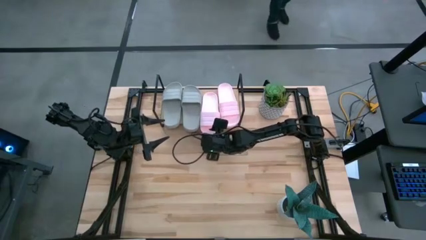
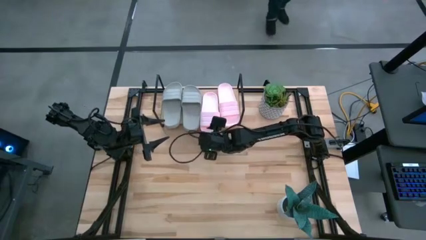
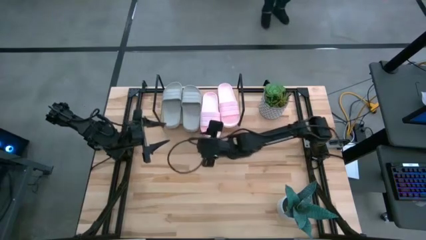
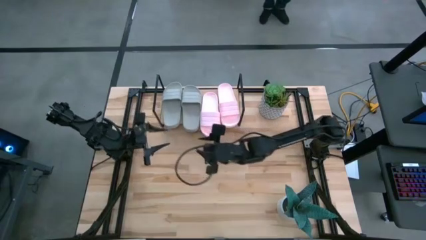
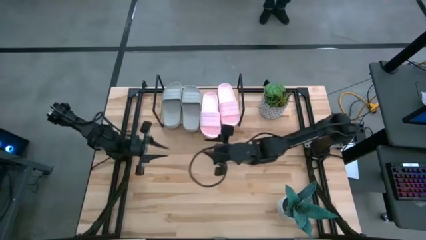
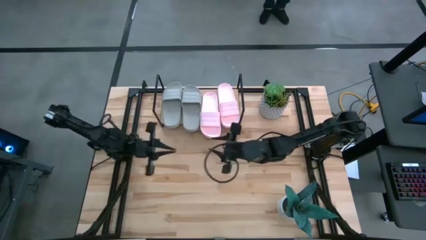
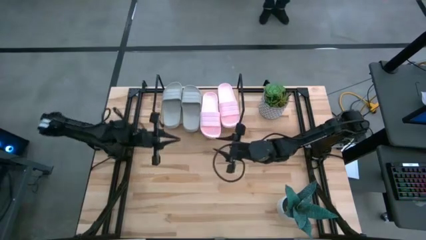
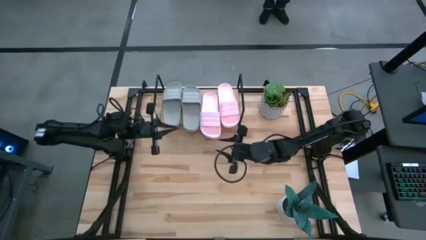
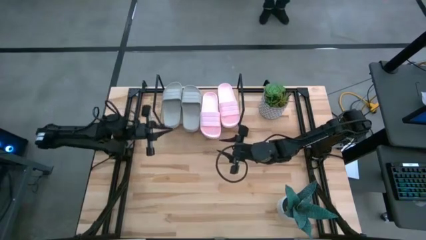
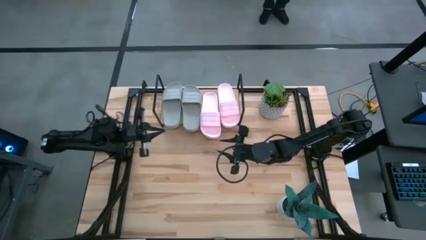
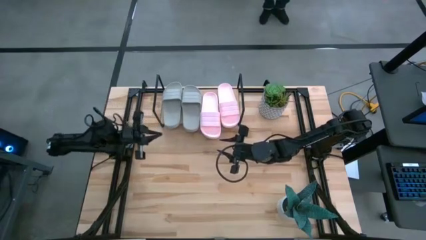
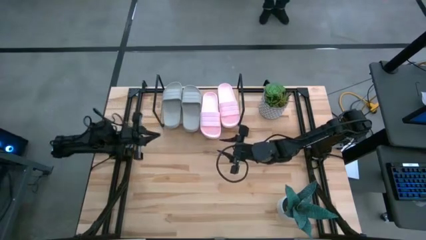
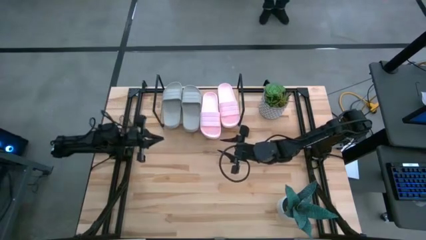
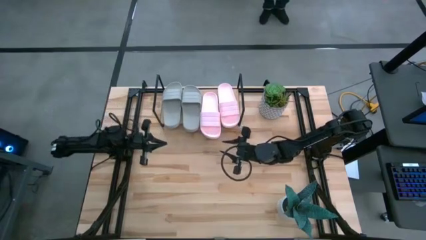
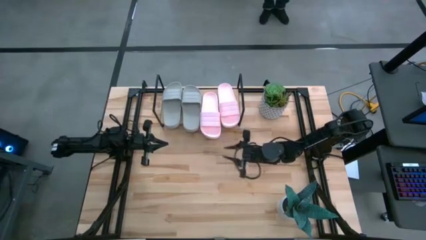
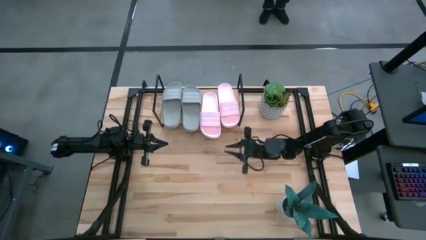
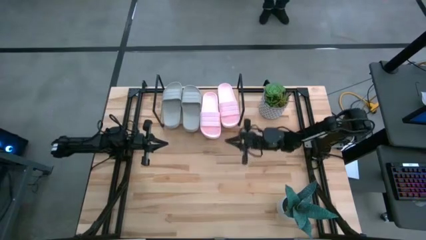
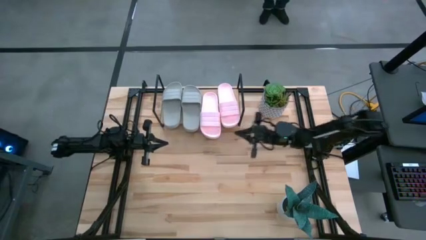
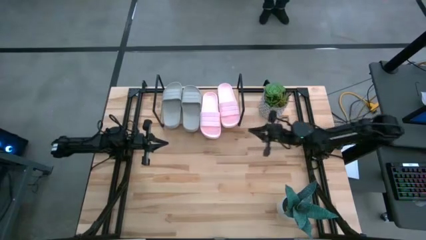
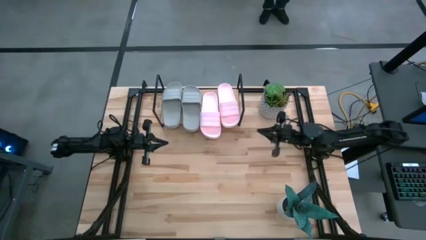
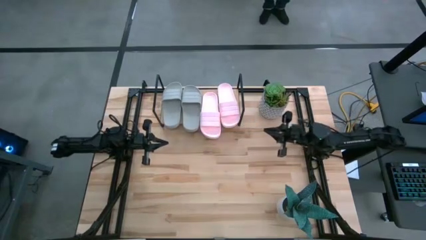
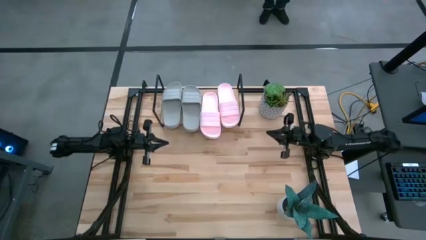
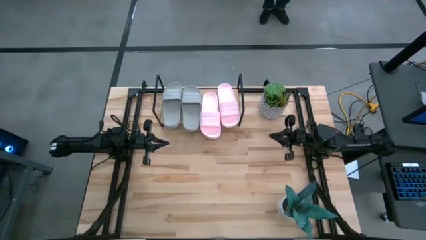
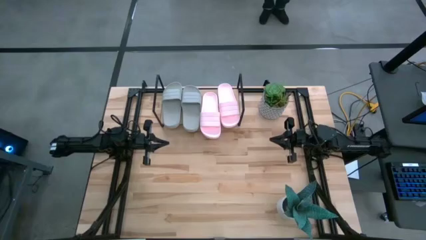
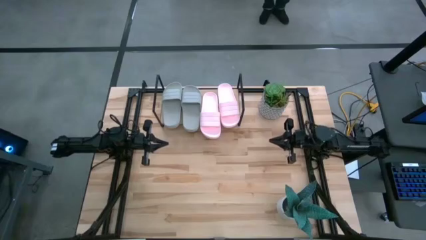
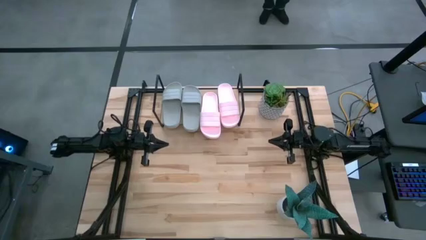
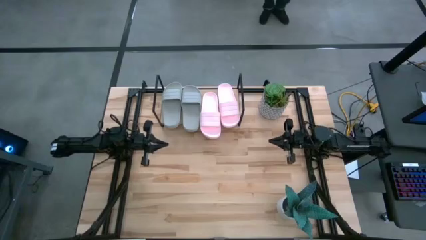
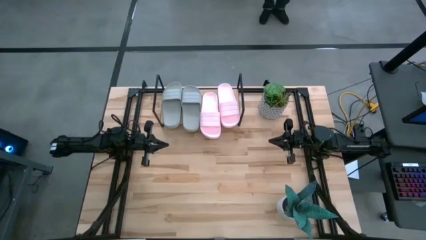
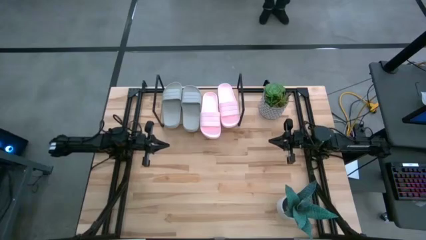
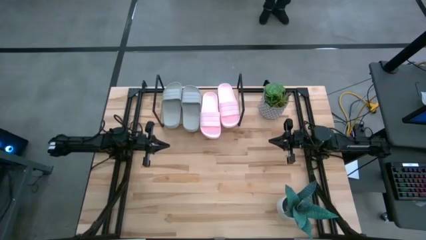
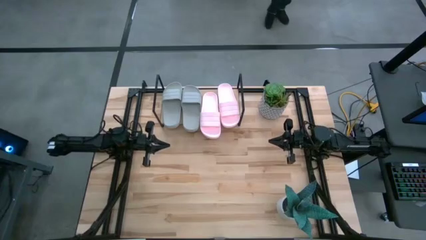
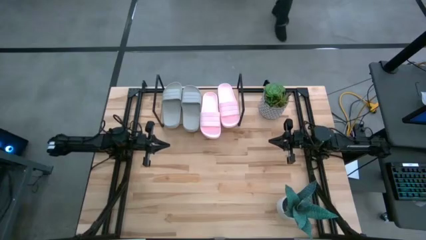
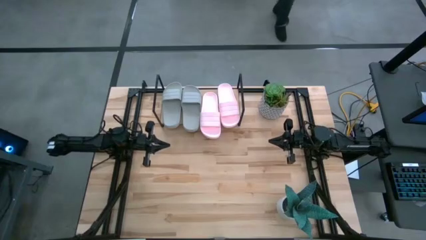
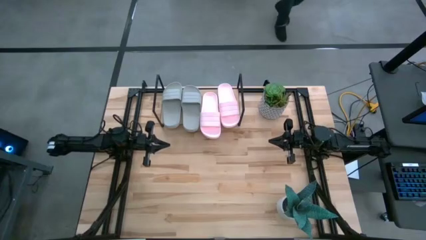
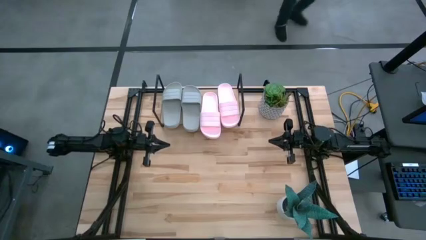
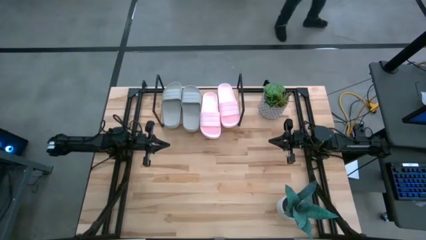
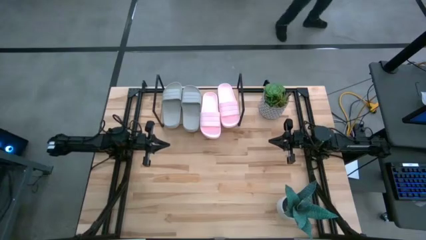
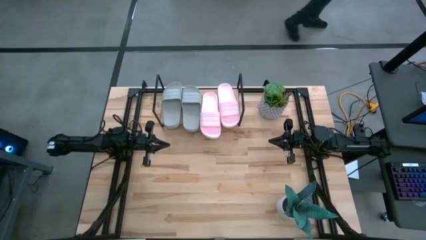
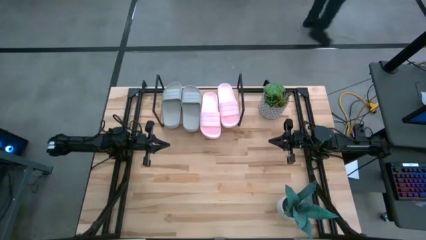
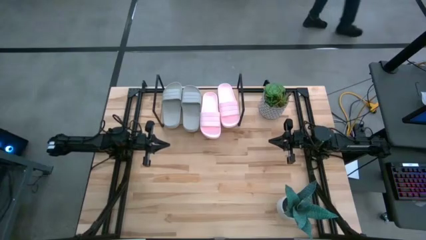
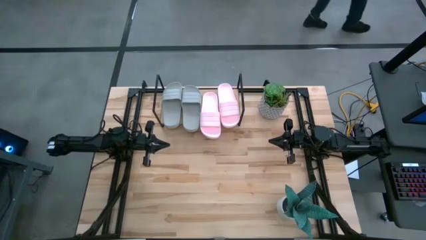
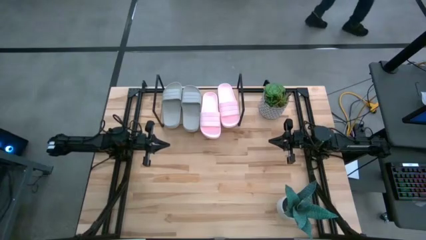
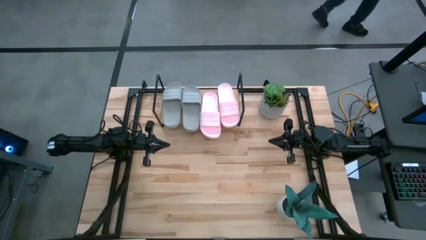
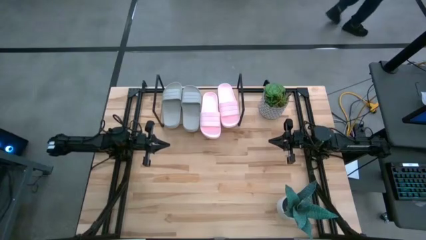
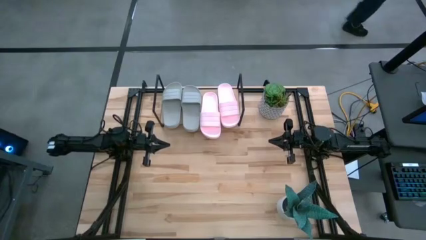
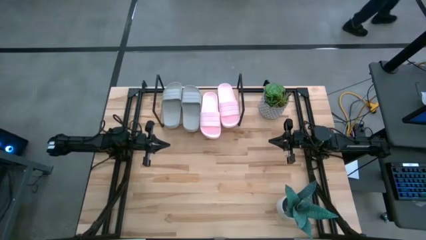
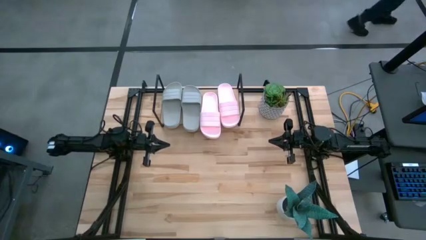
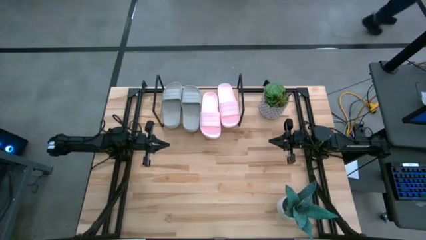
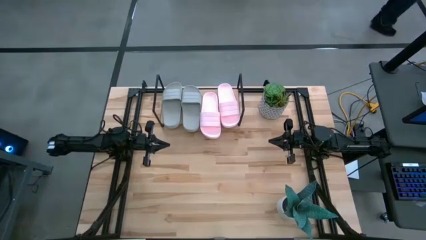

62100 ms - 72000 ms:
Task: Pick and place slides into the shelf
Return to Home Position

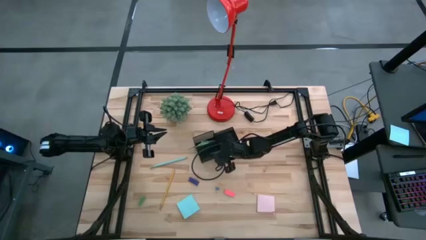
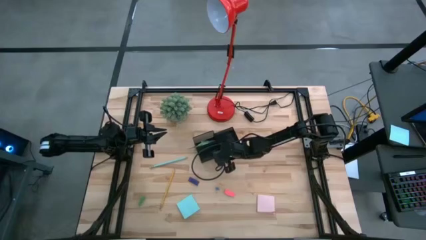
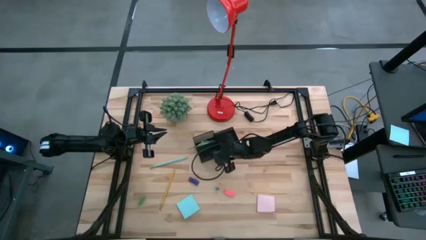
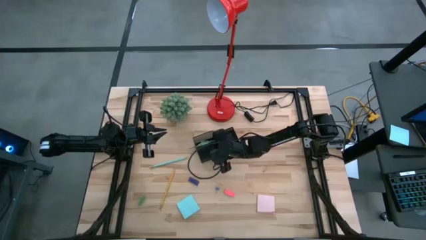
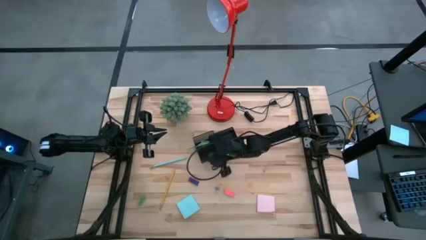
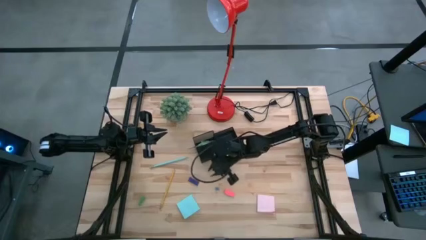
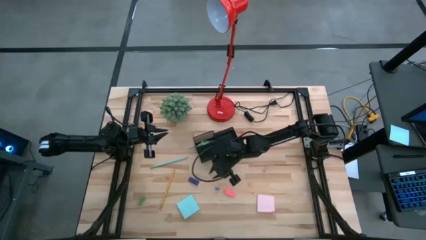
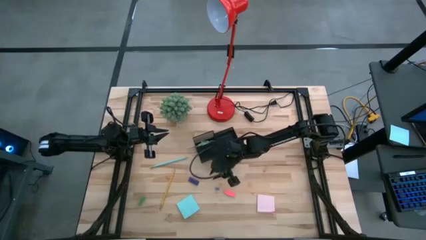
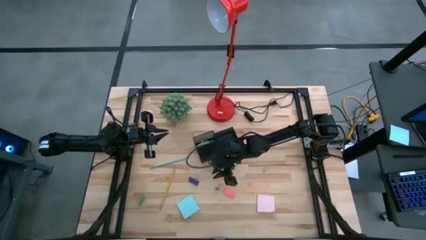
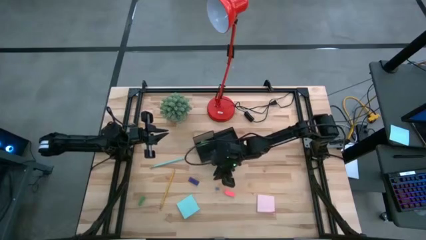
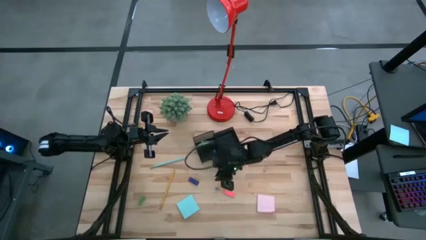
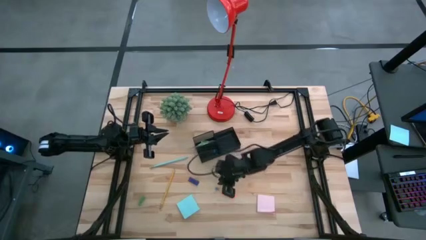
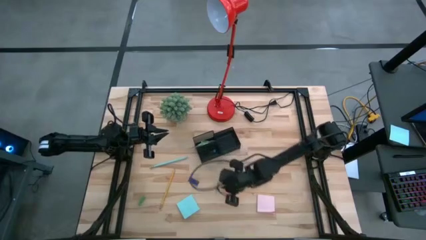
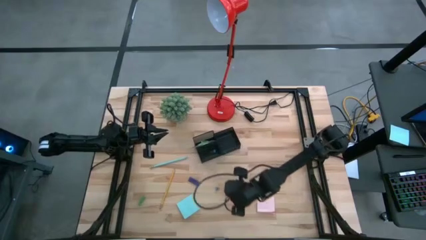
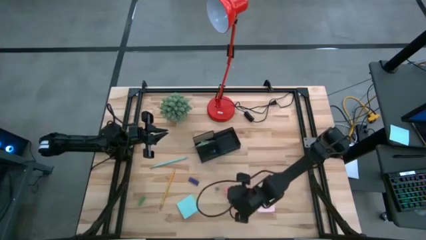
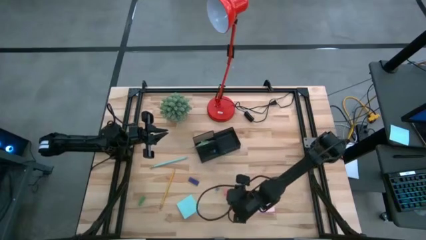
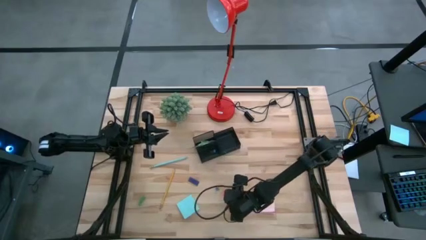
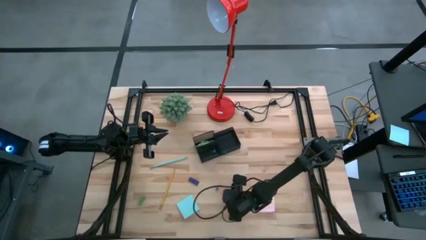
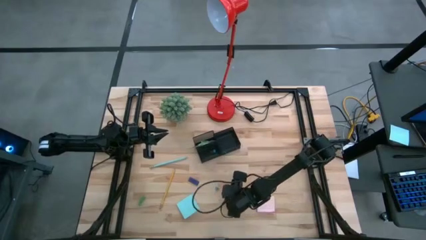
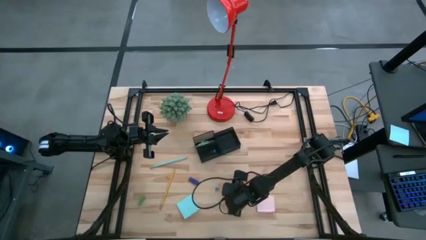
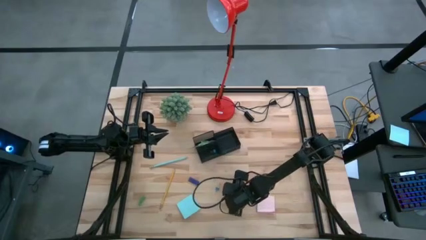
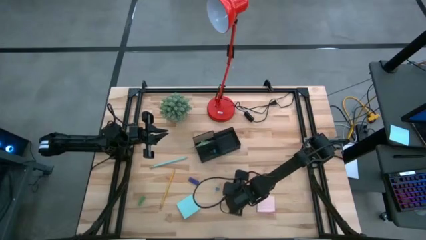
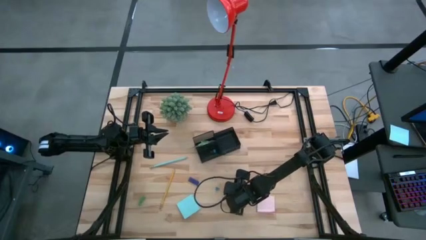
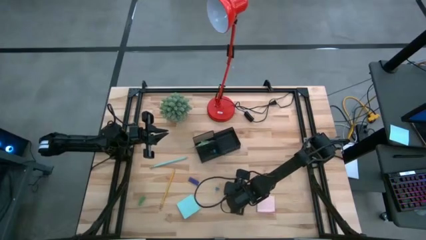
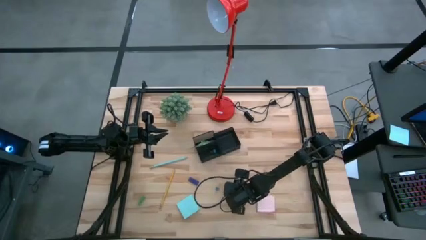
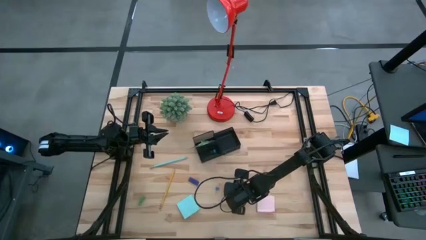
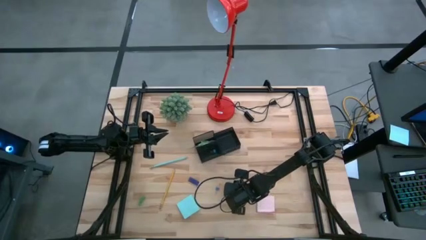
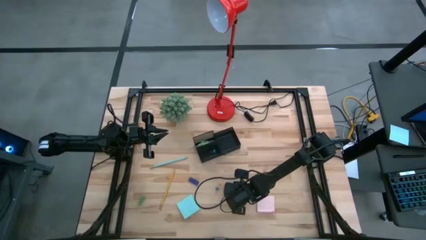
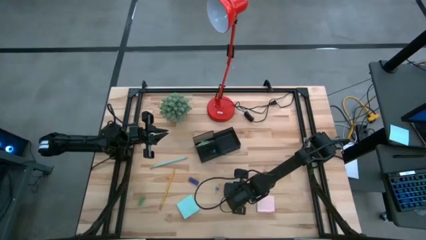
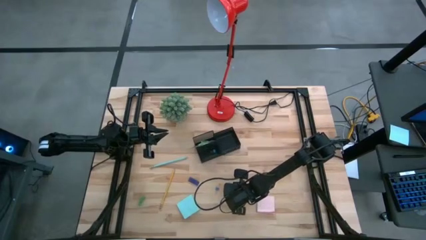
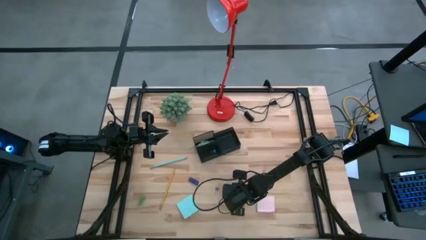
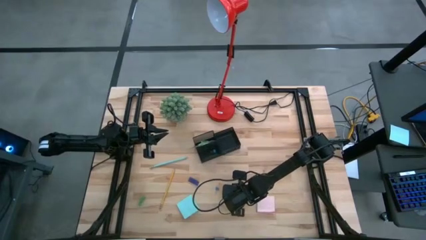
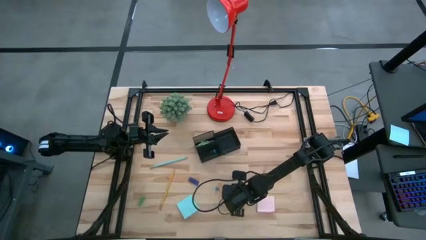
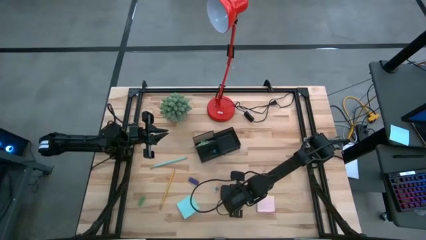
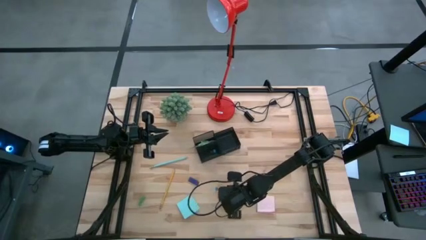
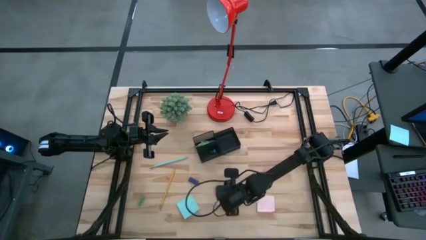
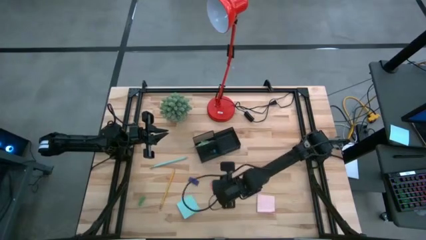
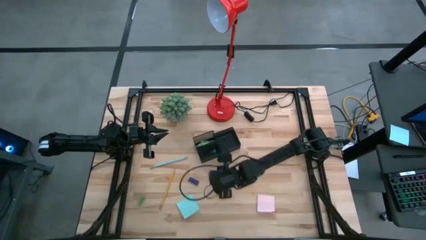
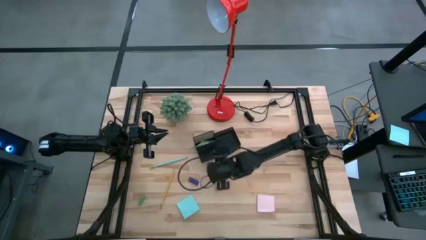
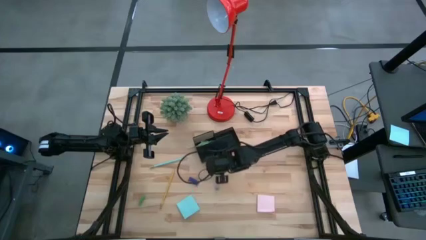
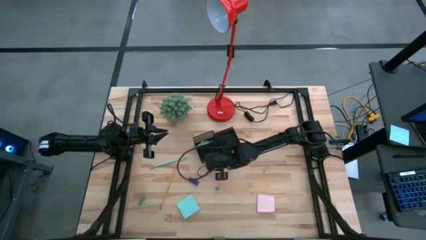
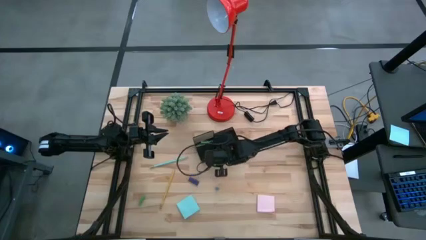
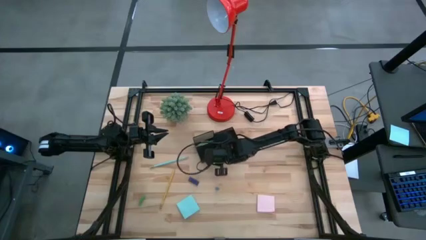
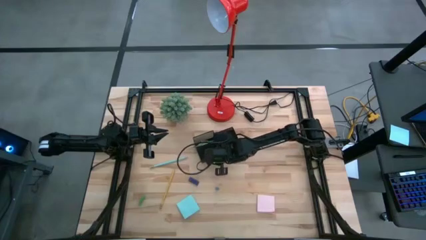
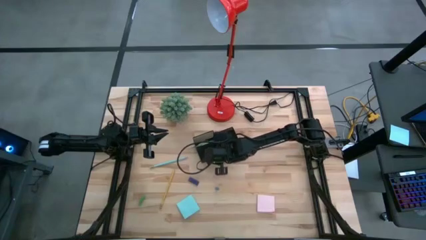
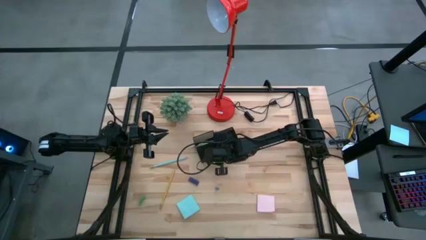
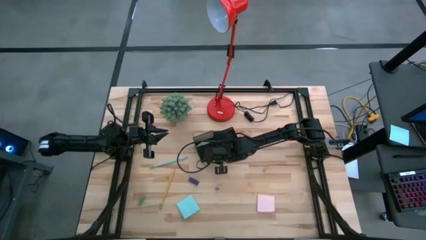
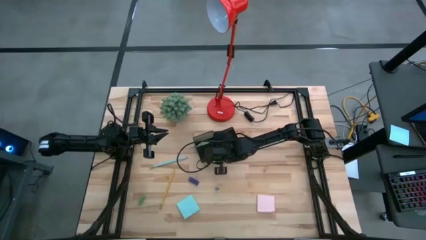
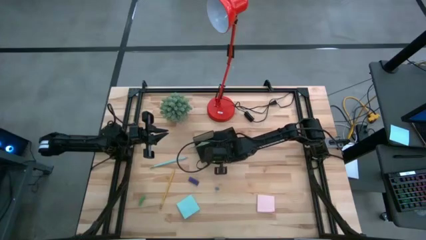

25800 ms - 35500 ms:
Task: Pick and place office supplies into organizer
Put the pink eraser into the black desk organizer
